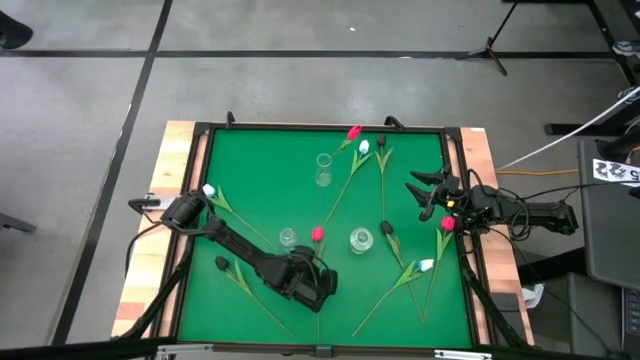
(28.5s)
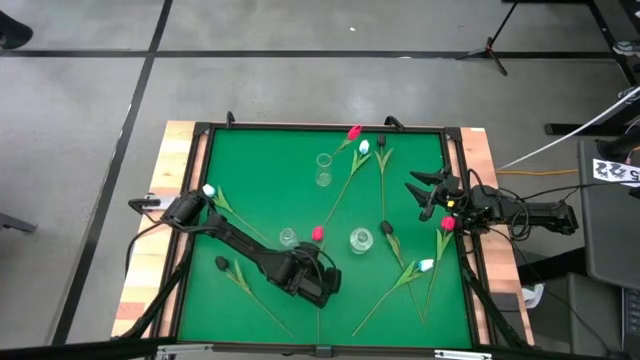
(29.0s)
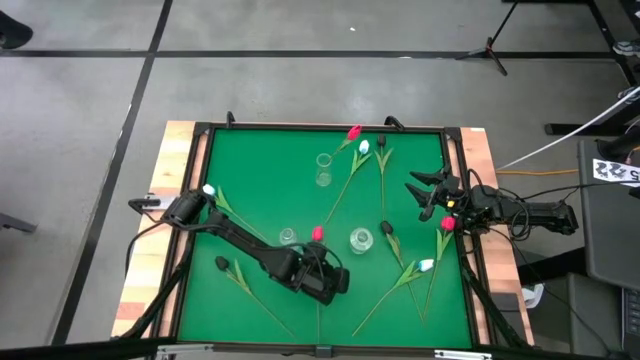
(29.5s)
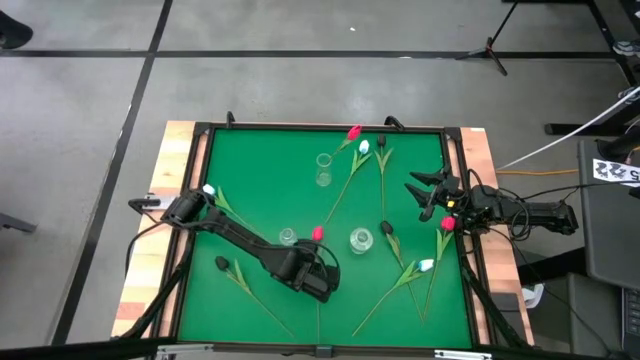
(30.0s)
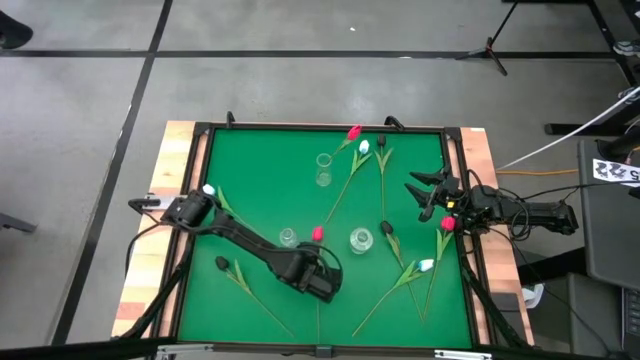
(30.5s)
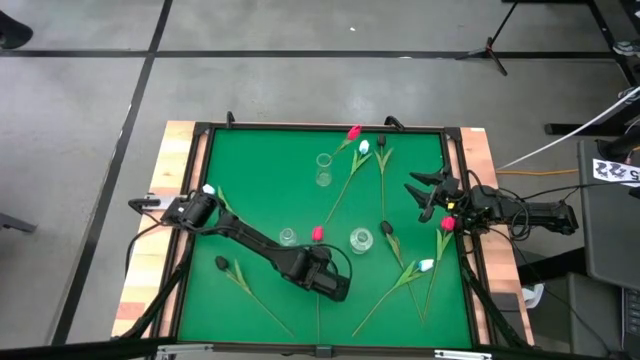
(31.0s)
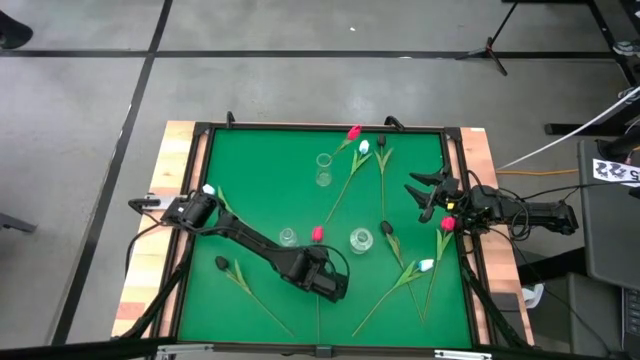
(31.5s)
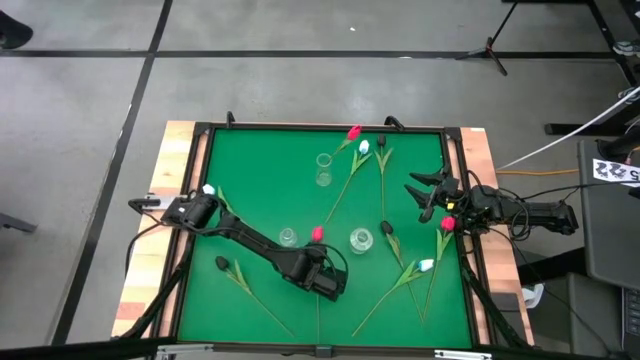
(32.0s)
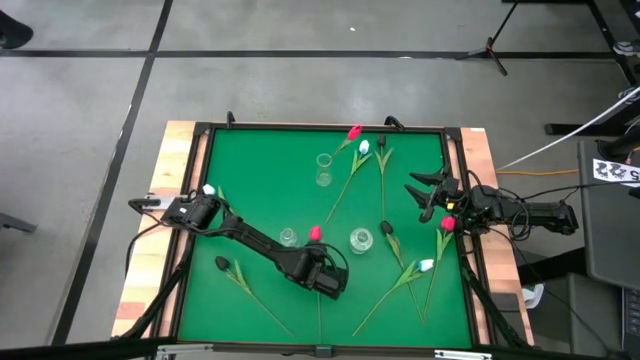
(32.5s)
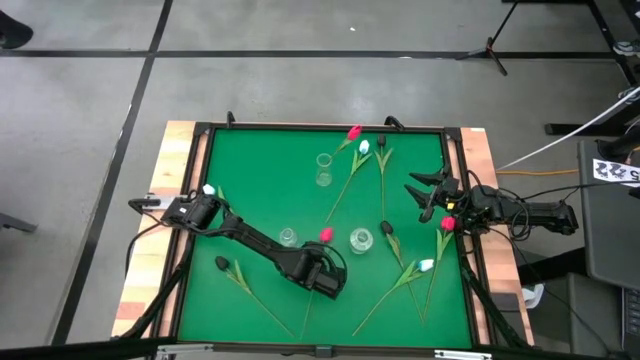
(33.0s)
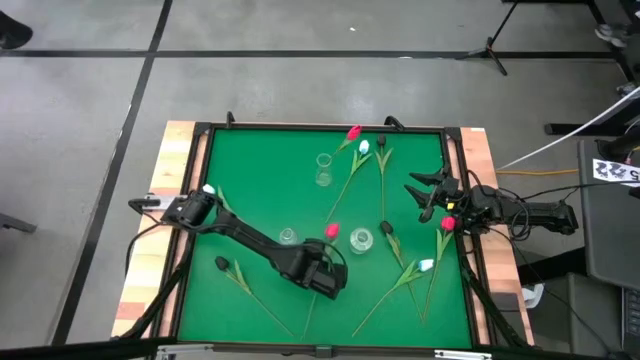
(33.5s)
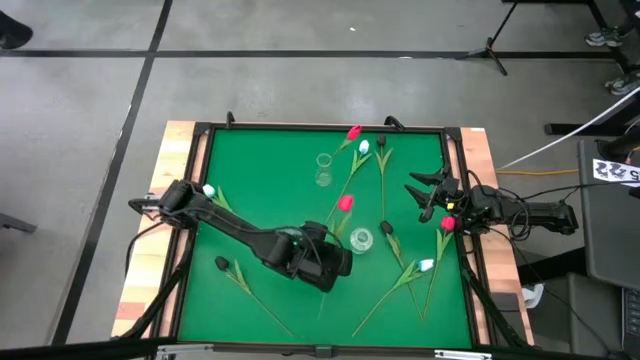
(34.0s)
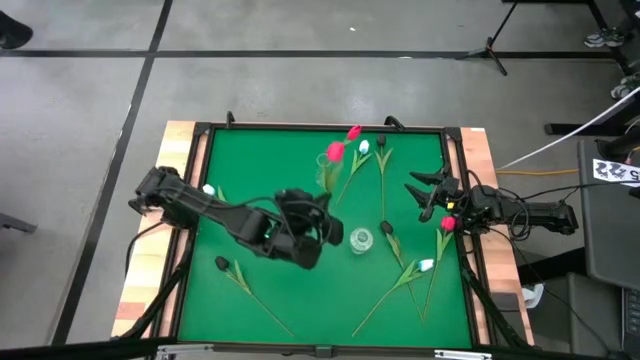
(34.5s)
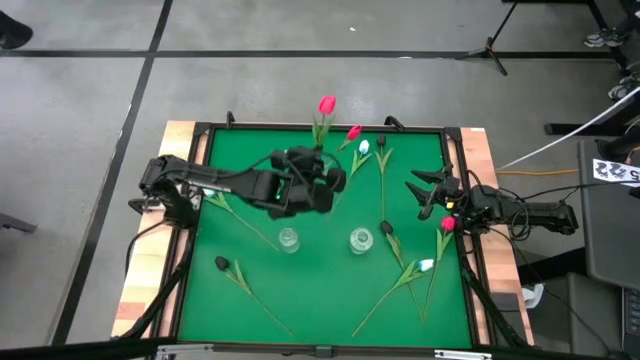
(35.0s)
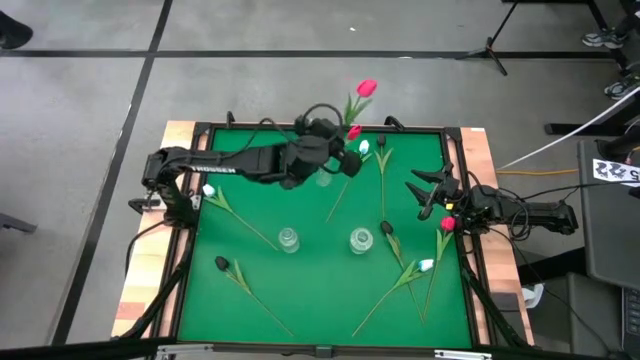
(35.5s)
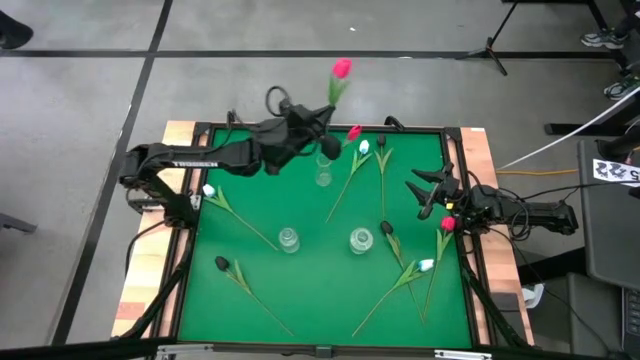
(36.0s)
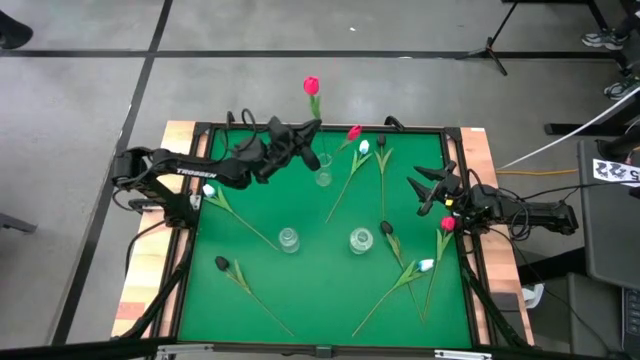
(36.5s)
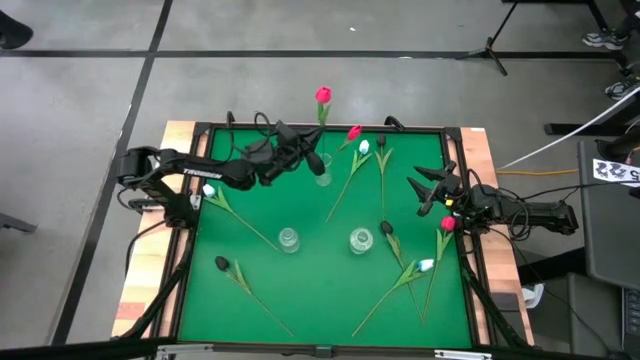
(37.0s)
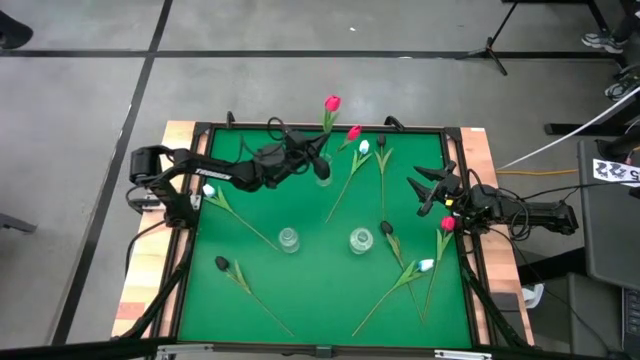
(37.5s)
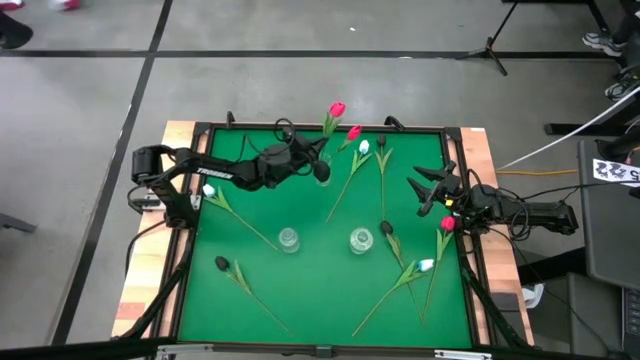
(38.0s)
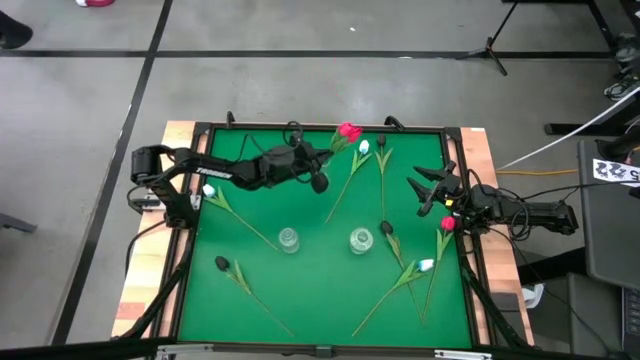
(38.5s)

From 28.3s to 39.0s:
Task: Sort flowers into vase by color
Put the left red tulip into the top transparent vase

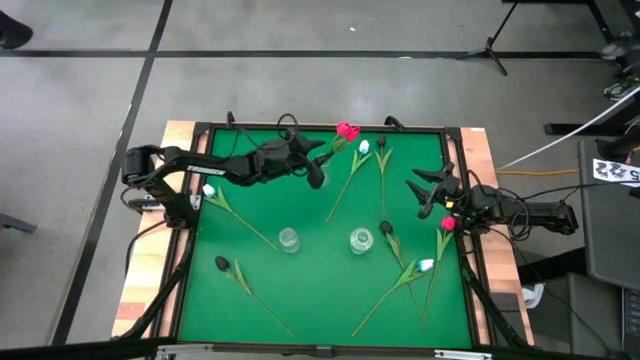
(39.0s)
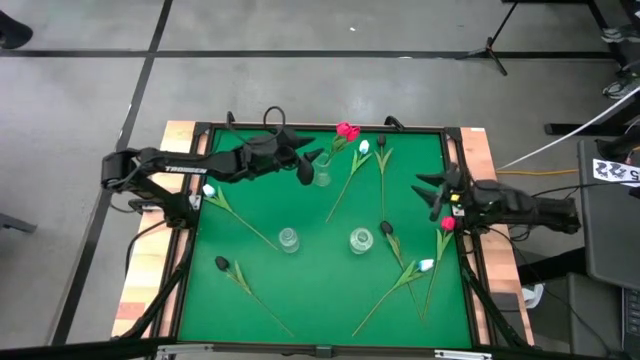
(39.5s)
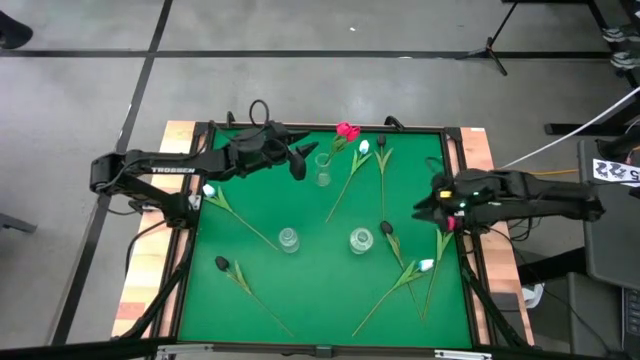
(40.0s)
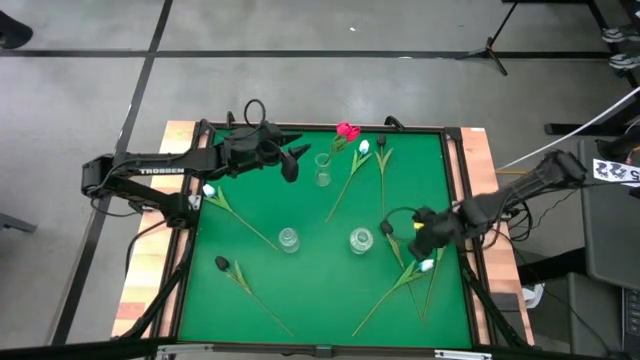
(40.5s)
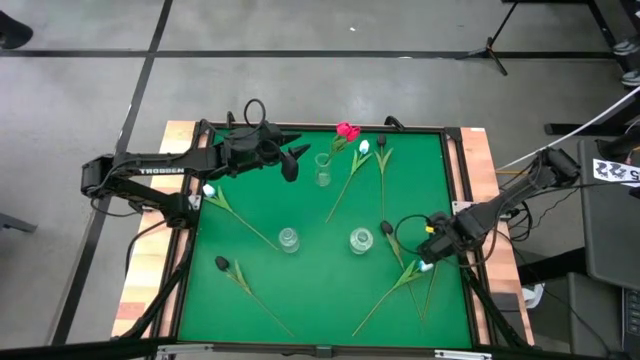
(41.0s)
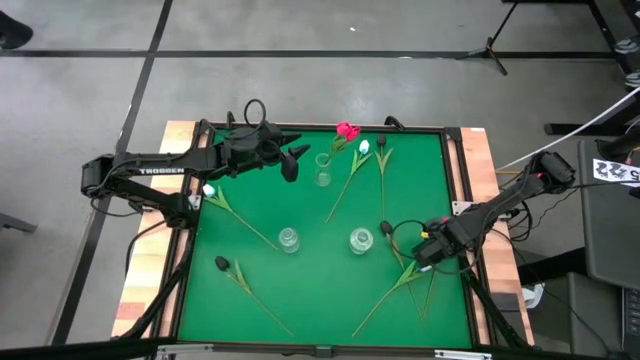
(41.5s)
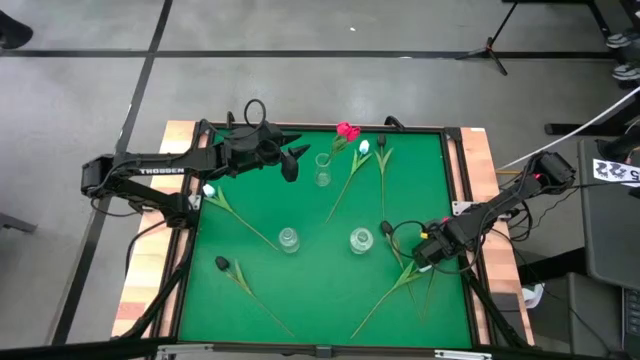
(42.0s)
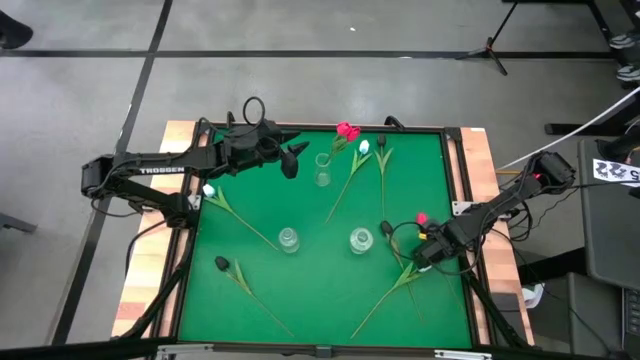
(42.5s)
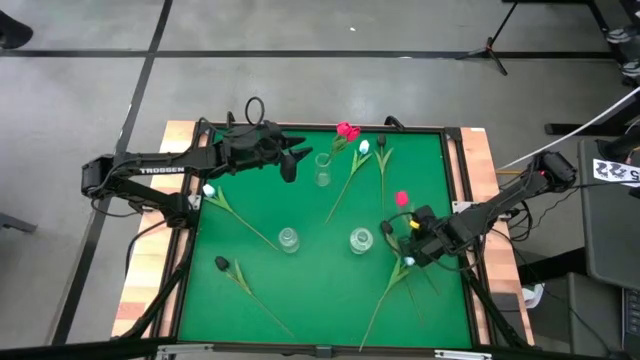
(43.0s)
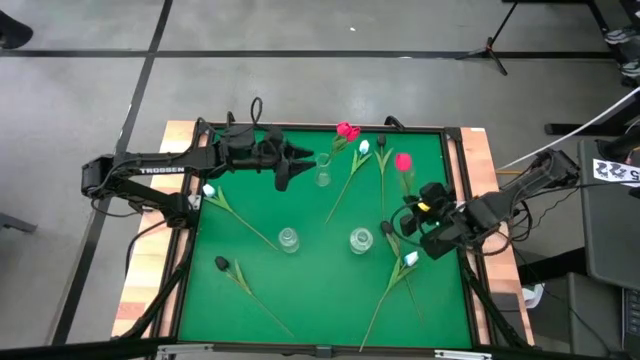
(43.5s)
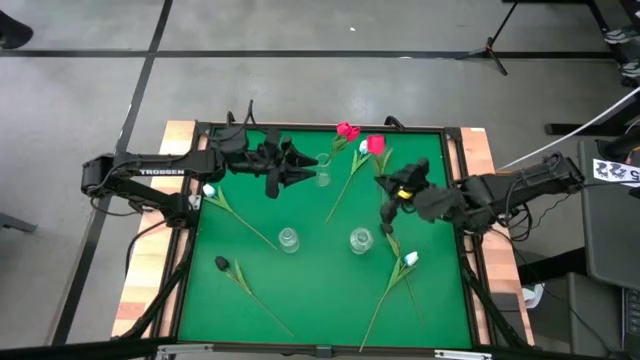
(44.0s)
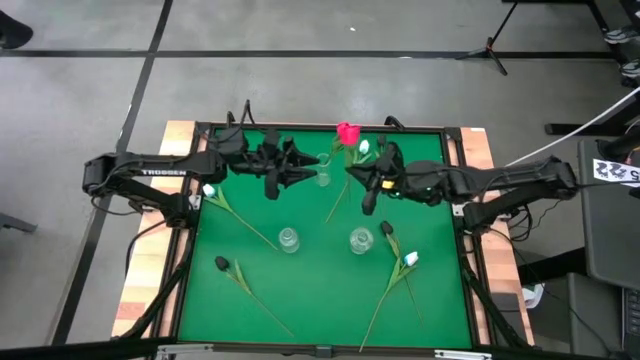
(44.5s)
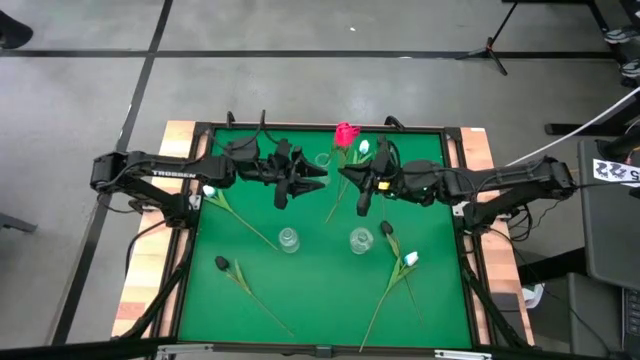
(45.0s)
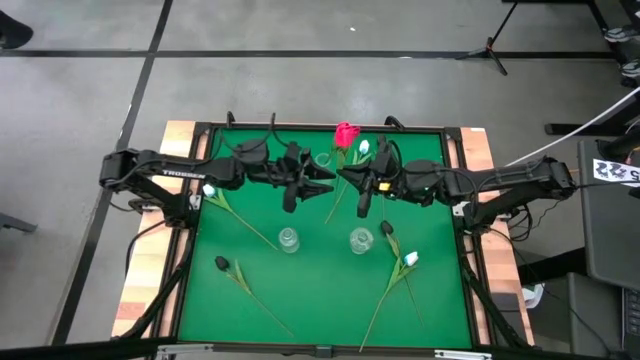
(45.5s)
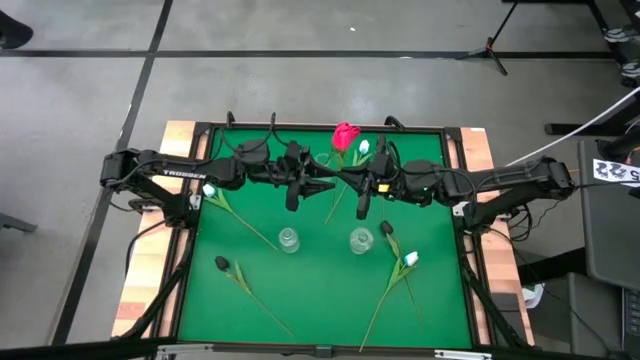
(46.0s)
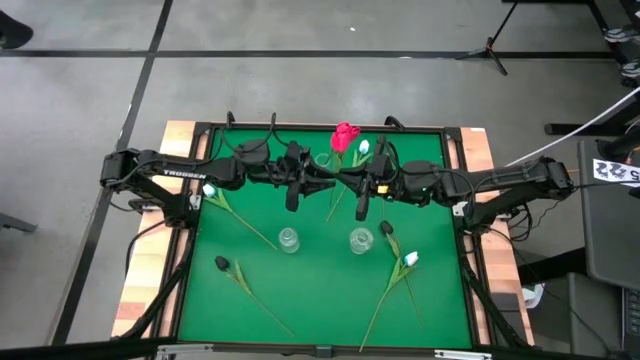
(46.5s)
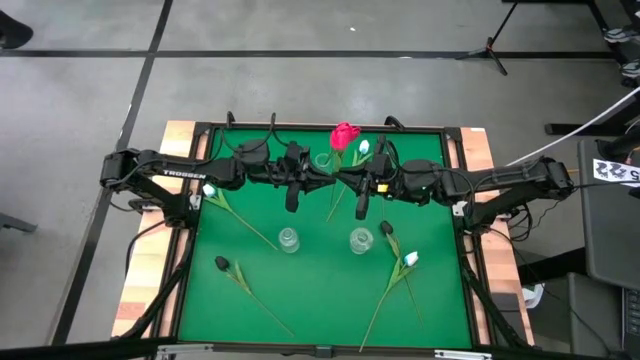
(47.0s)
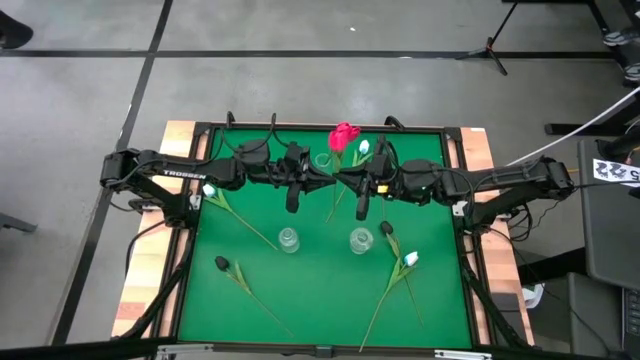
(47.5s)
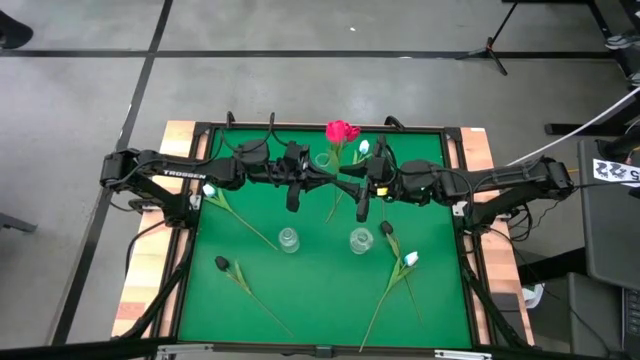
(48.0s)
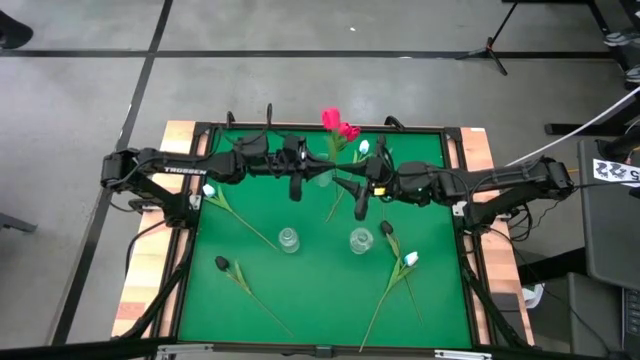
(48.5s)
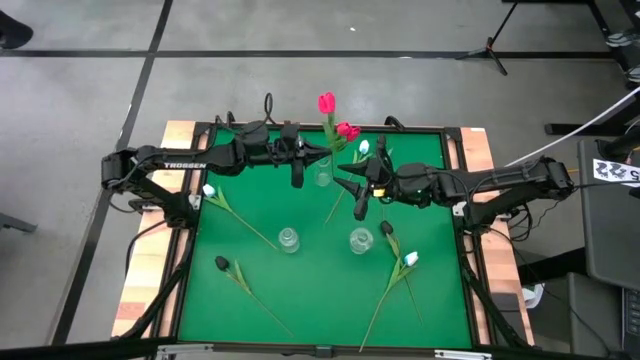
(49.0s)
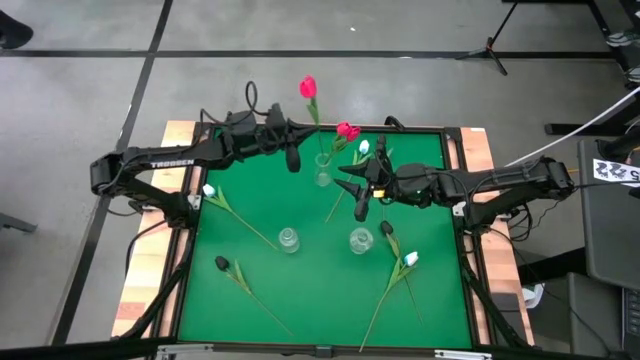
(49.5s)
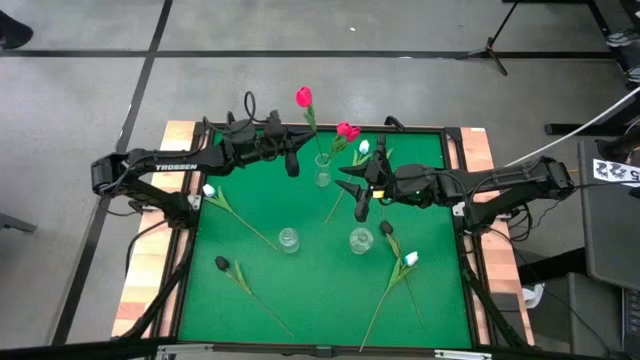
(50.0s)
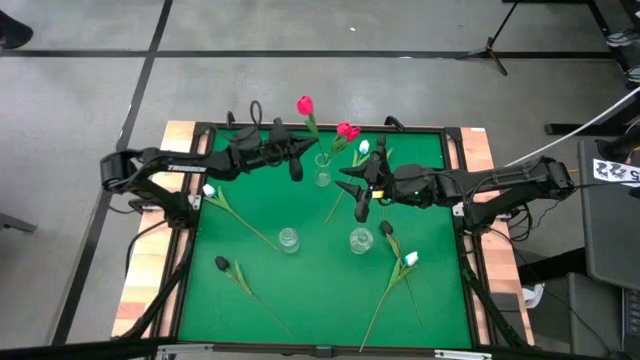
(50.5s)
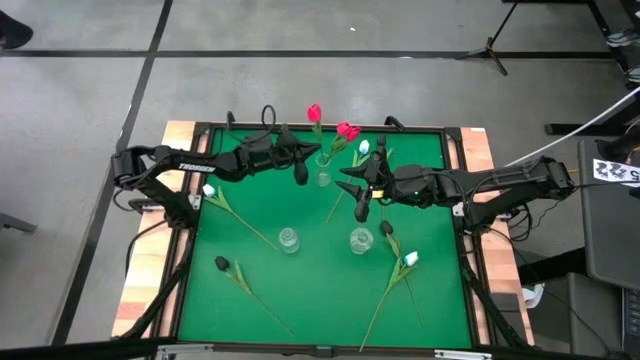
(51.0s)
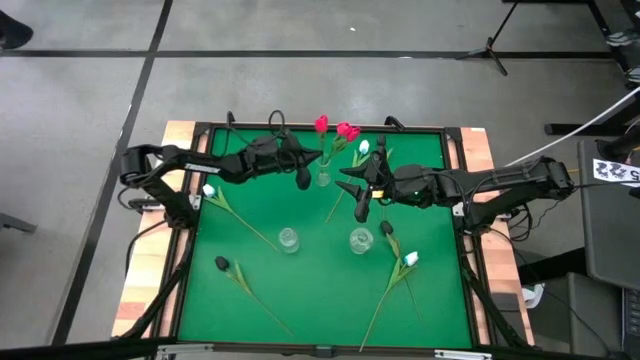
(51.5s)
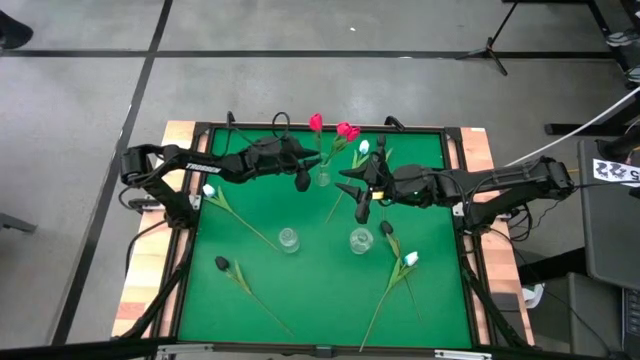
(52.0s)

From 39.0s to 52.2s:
Put the red tulip into the top transparent vase
